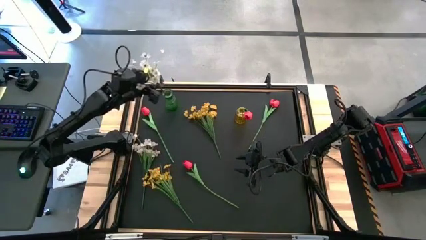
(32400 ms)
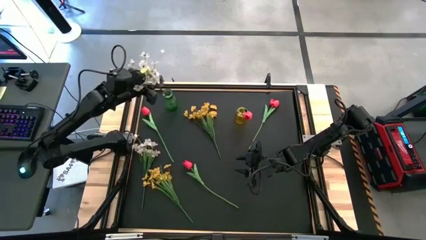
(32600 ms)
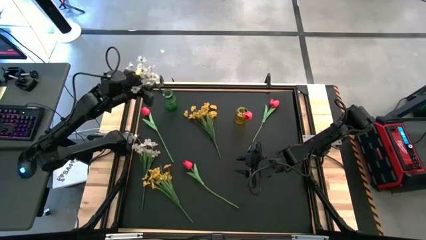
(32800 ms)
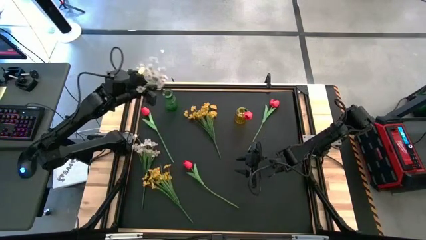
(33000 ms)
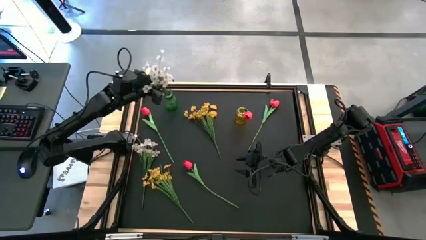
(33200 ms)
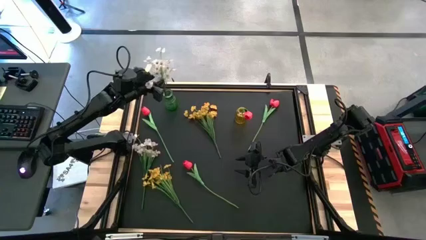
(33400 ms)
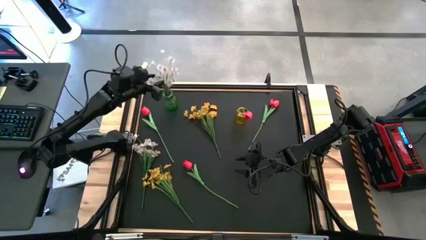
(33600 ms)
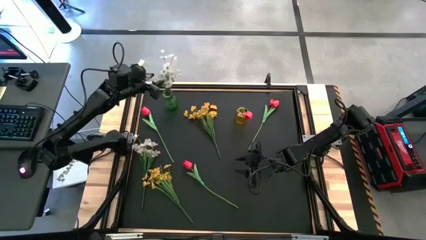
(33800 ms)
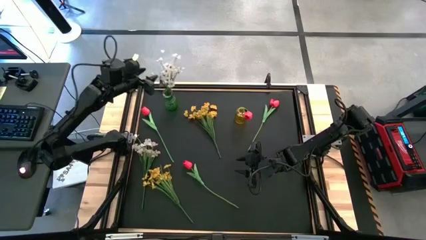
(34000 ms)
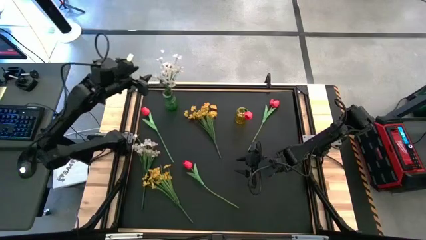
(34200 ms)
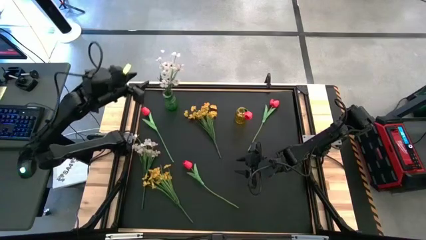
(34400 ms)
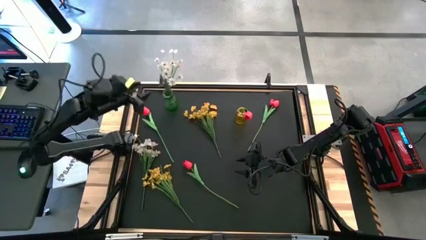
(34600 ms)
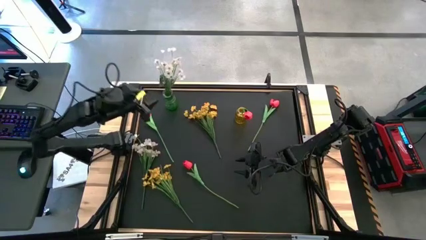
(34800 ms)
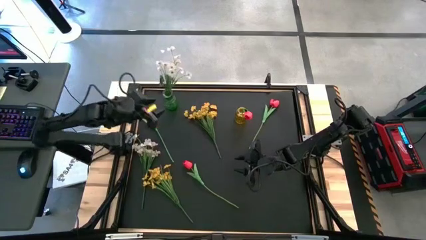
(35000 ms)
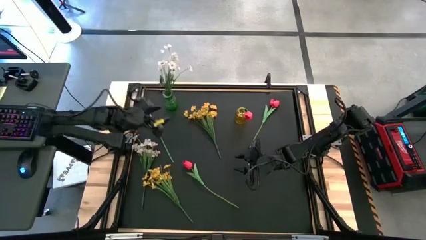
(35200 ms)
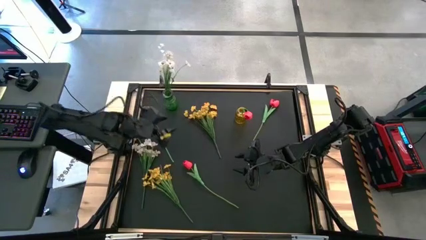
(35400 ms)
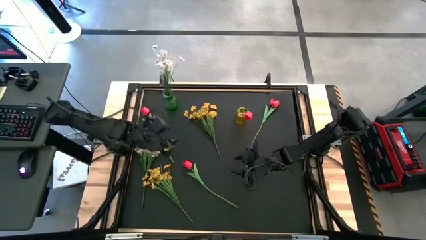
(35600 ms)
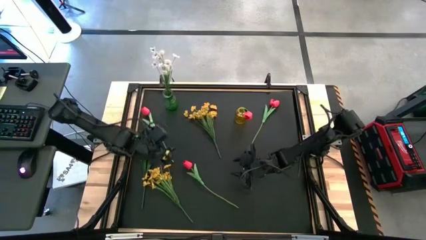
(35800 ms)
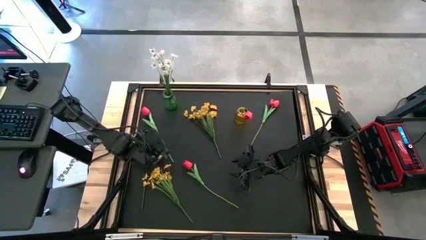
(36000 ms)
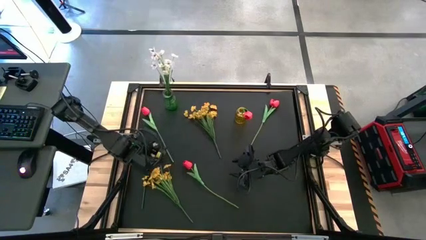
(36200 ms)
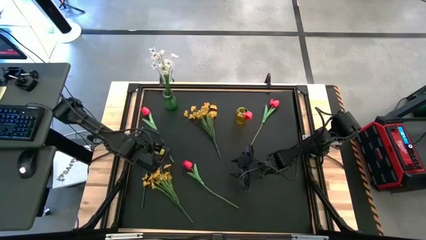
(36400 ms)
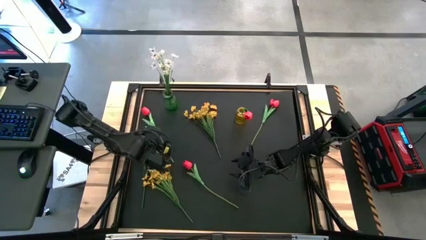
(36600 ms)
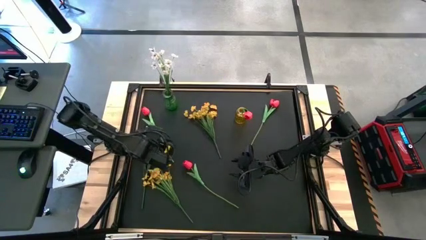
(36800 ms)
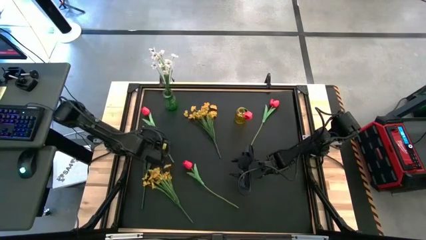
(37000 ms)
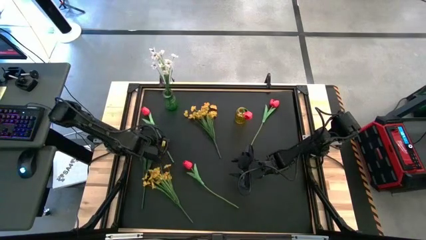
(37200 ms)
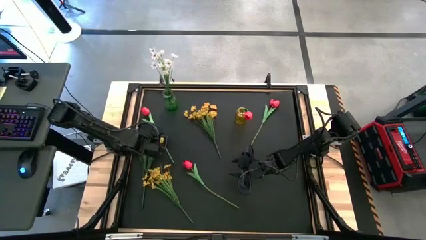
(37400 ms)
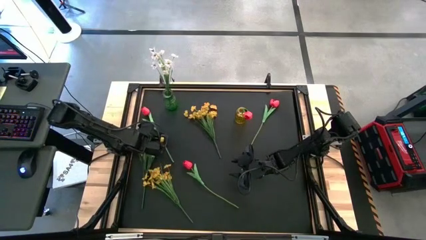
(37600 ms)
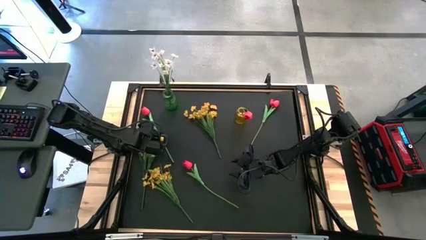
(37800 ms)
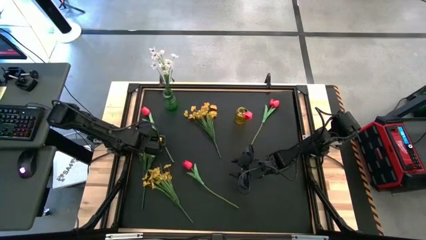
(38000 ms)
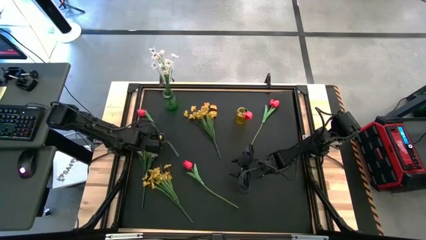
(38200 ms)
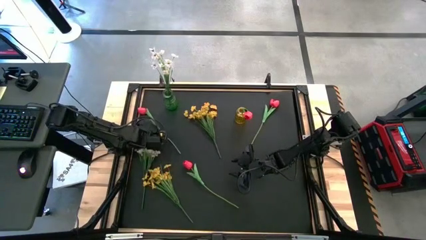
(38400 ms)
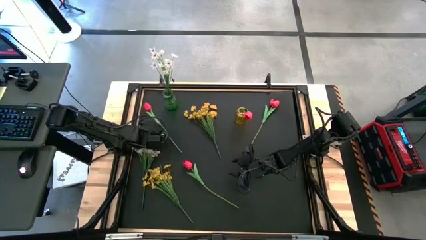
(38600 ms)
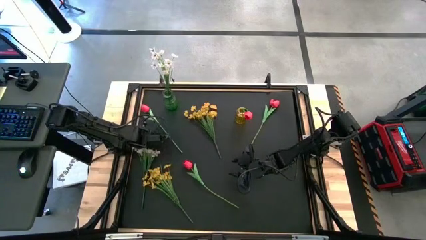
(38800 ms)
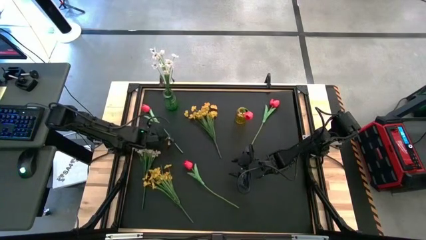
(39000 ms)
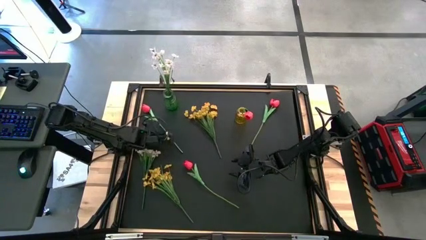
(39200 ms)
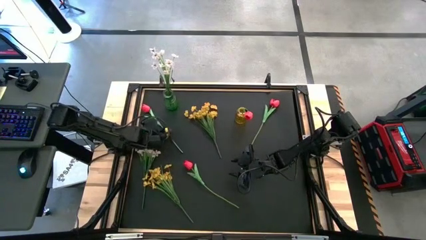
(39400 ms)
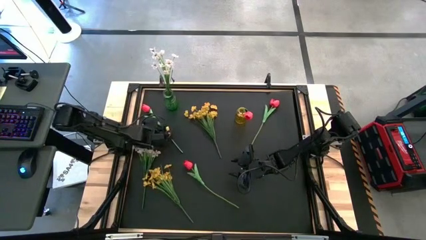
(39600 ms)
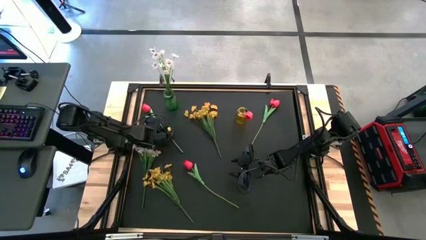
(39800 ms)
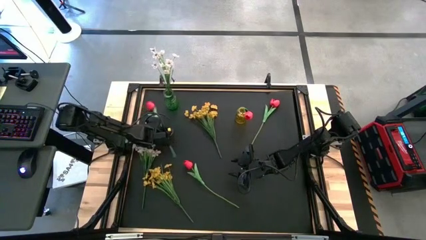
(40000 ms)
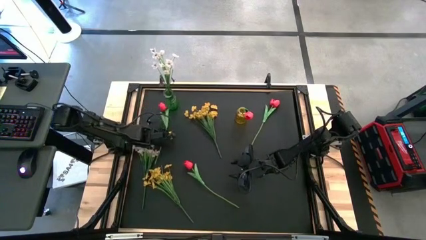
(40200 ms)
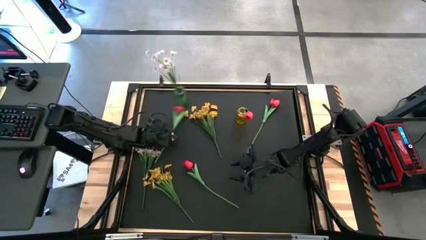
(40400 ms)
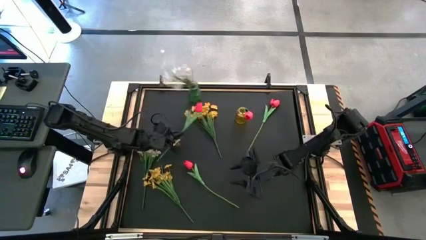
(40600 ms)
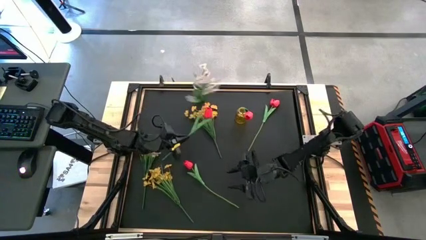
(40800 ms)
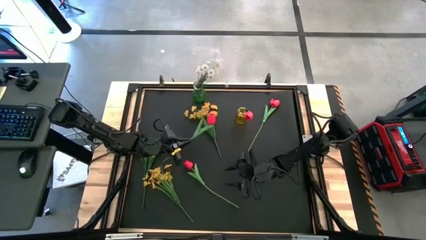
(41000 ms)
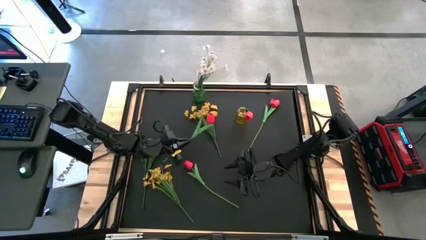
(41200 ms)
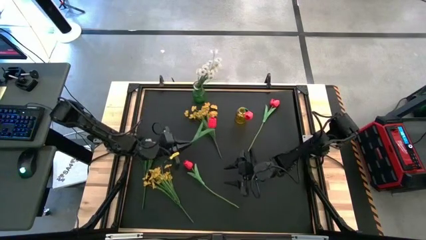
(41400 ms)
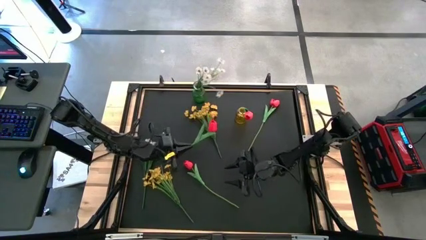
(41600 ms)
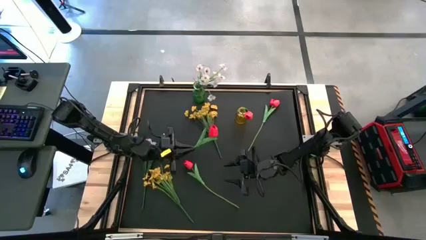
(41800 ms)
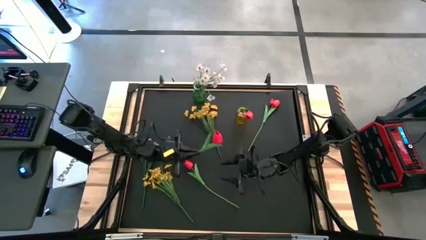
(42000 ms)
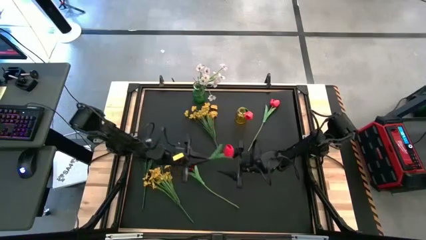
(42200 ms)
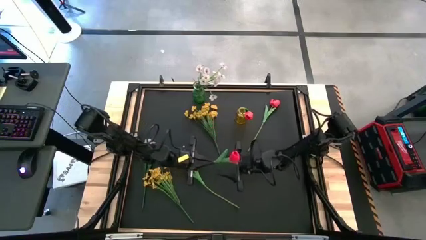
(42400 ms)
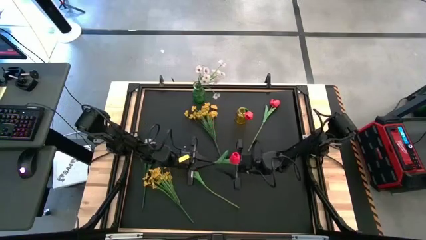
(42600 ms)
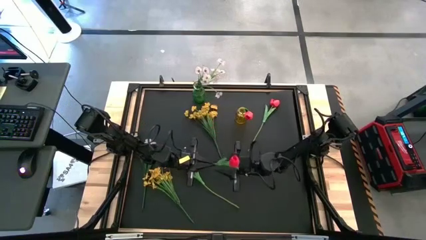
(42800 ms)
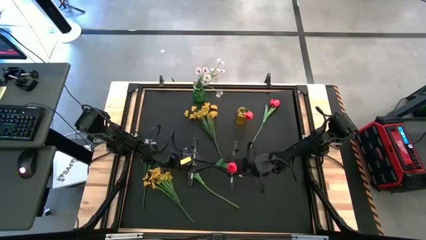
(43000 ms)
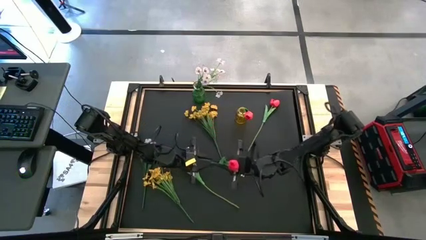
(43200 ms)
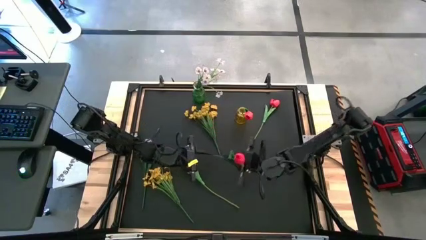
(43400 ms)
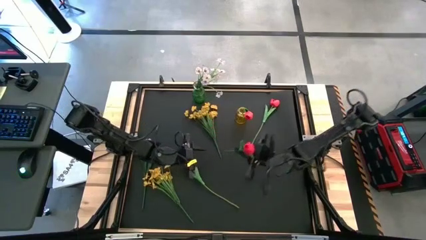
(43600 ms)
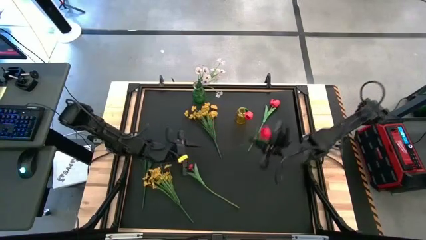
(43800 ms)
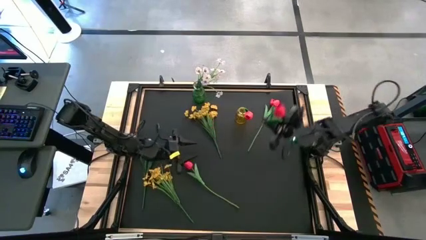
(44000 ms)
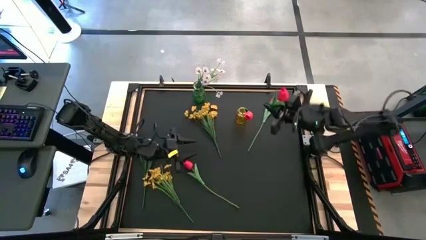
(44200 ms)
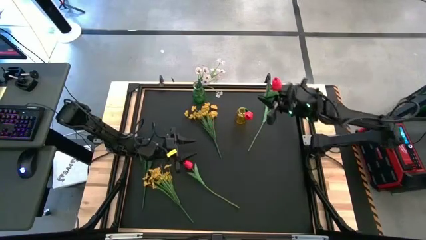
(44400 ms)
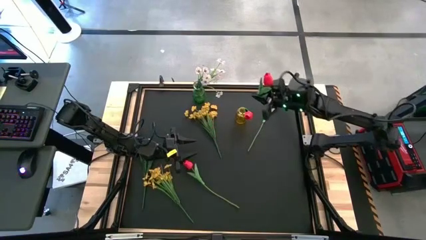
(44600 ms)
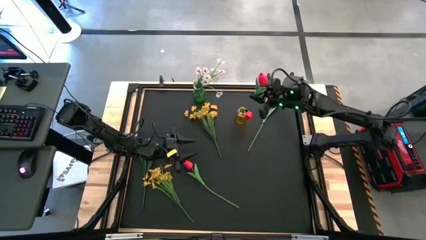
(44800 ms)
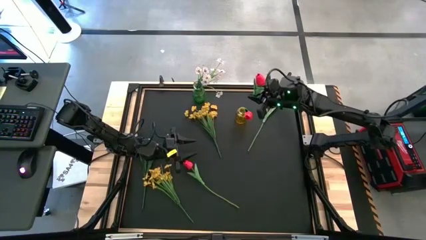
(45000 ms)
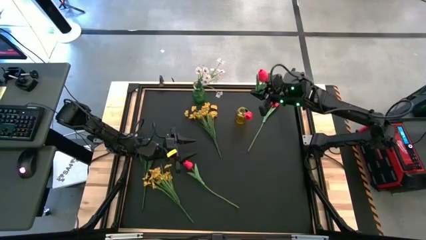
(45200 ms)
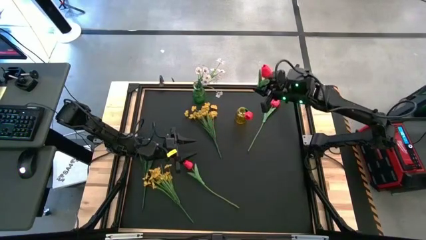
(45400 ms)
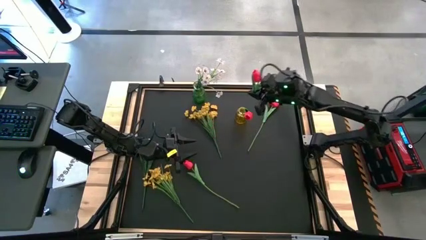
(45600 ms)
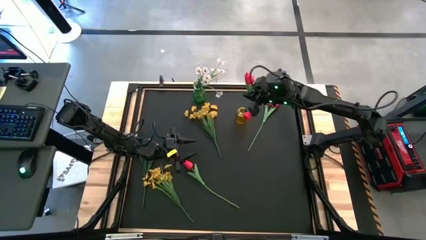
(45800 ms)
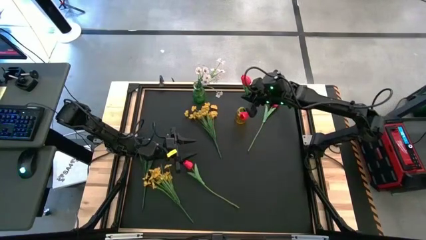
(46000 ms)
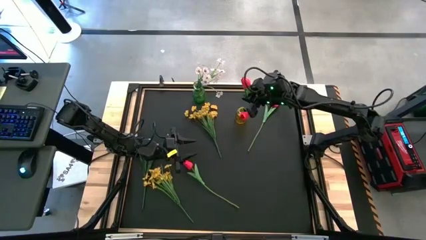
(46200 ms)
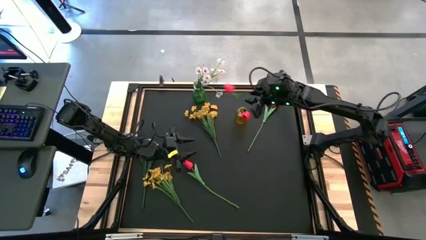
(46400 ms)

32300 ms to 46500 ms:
Task: Sort flowers into vase by color
Put the left pink flower into the yellow vase
